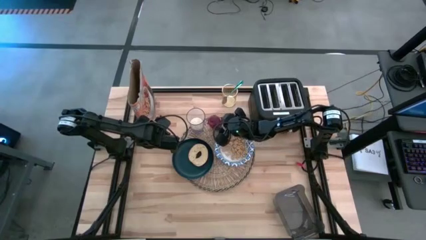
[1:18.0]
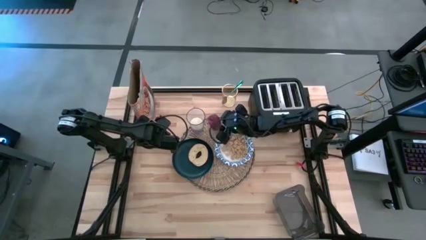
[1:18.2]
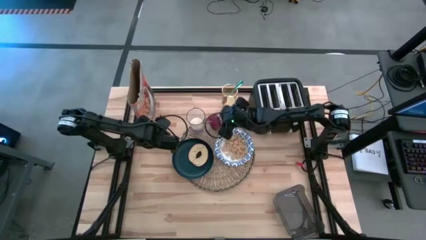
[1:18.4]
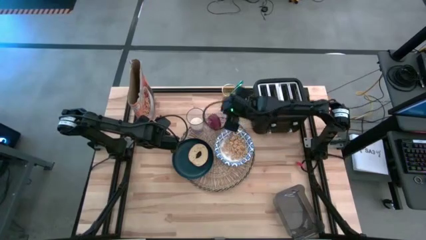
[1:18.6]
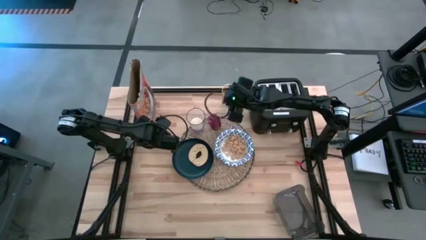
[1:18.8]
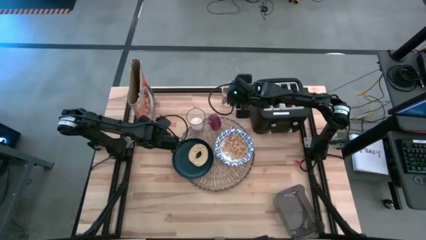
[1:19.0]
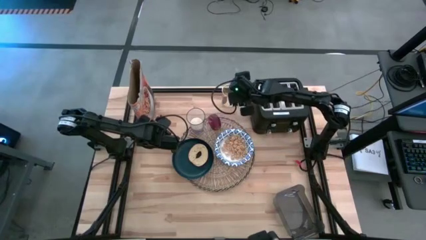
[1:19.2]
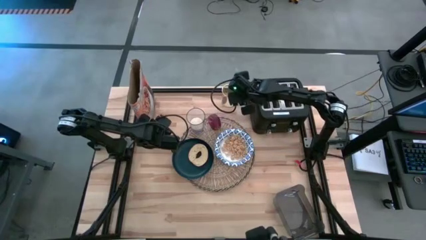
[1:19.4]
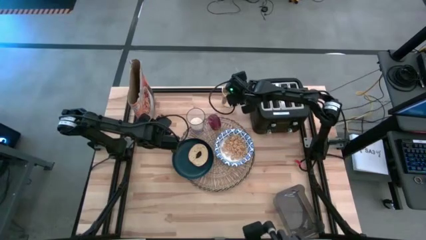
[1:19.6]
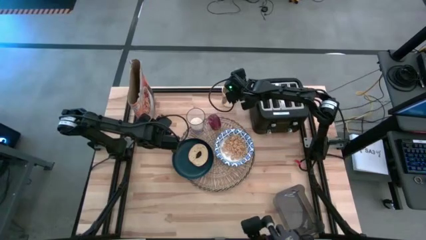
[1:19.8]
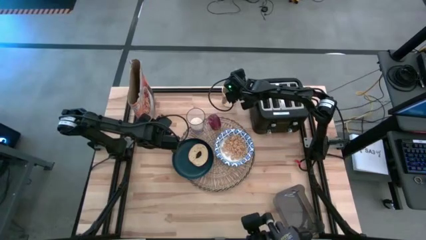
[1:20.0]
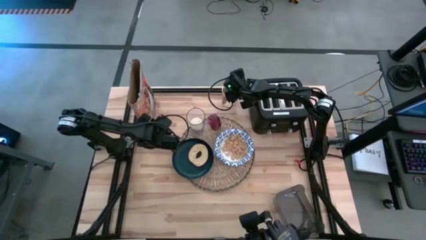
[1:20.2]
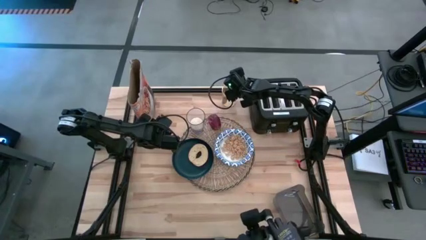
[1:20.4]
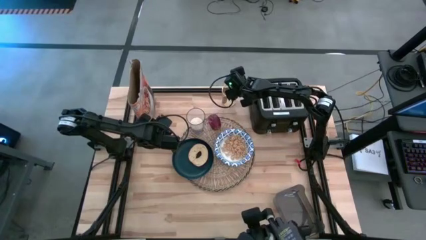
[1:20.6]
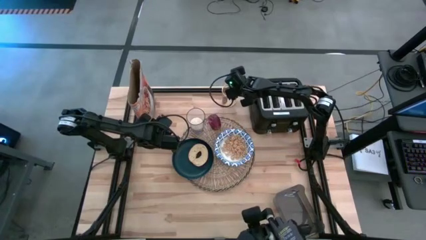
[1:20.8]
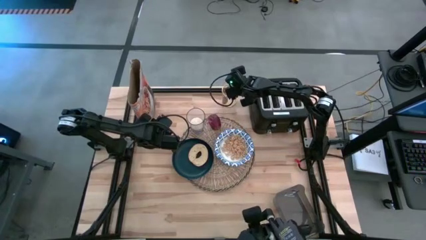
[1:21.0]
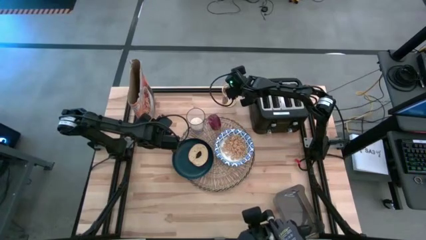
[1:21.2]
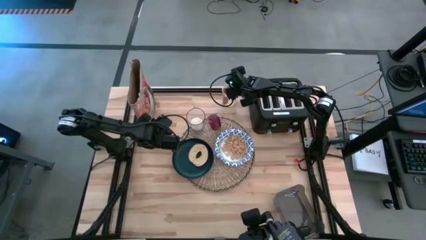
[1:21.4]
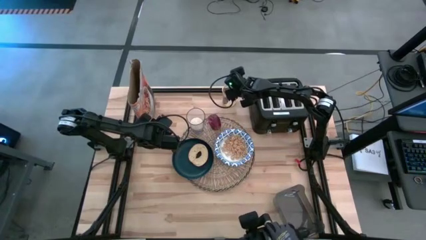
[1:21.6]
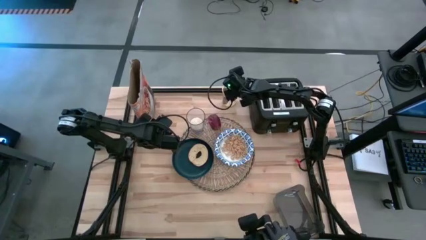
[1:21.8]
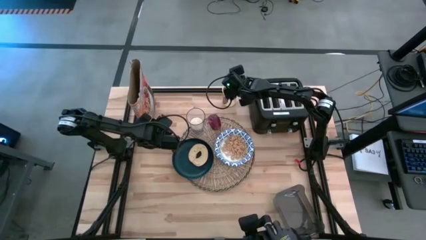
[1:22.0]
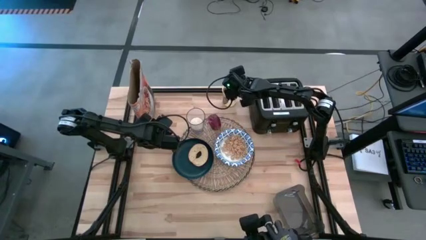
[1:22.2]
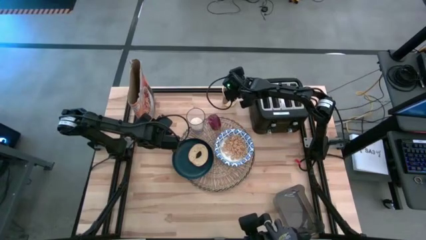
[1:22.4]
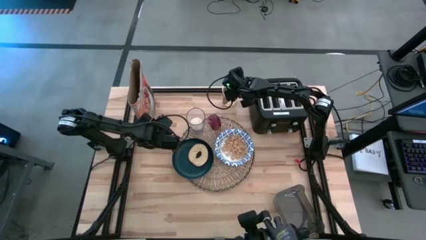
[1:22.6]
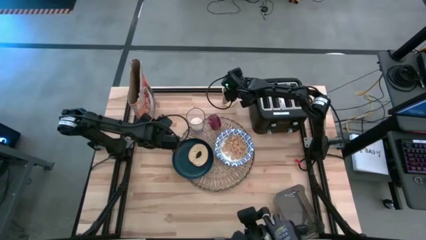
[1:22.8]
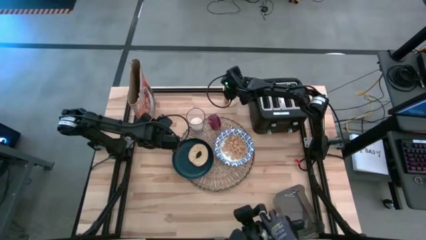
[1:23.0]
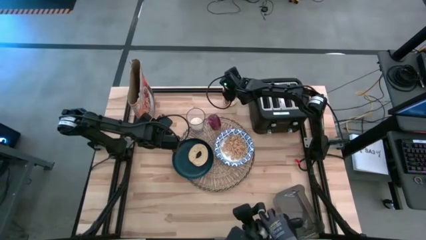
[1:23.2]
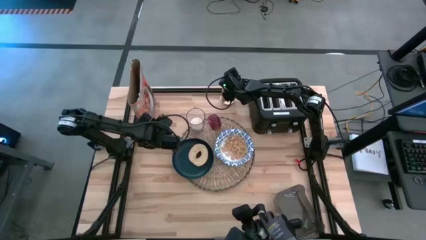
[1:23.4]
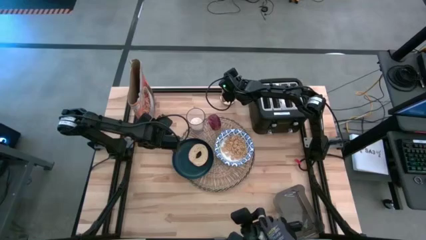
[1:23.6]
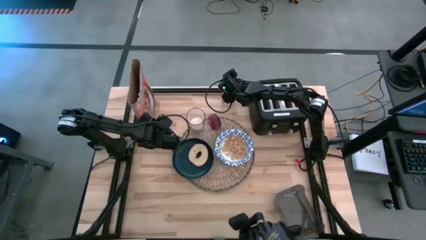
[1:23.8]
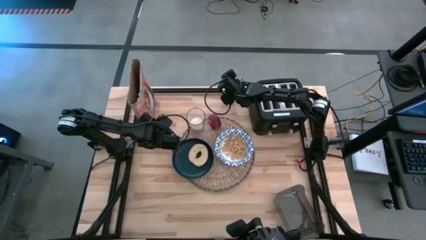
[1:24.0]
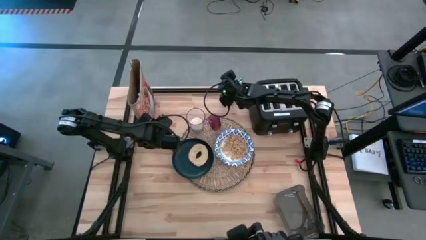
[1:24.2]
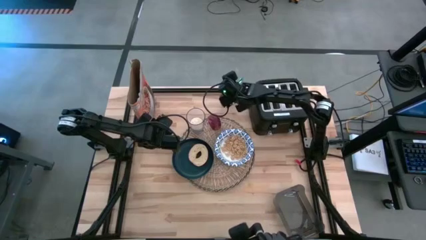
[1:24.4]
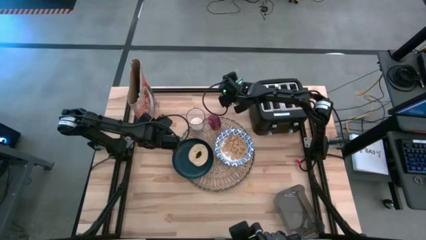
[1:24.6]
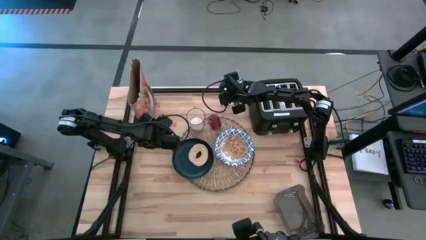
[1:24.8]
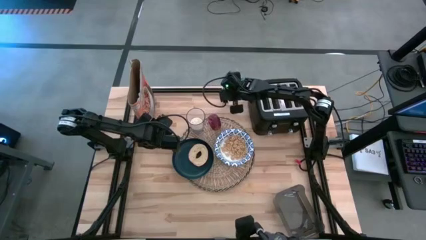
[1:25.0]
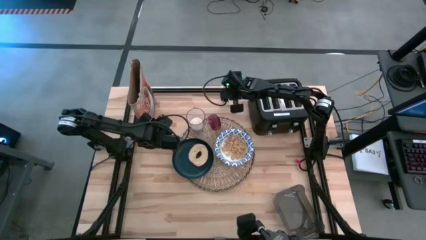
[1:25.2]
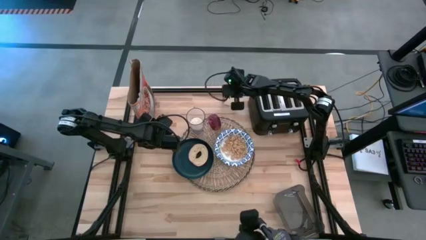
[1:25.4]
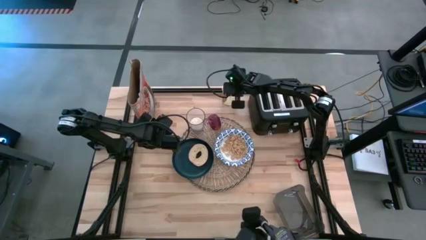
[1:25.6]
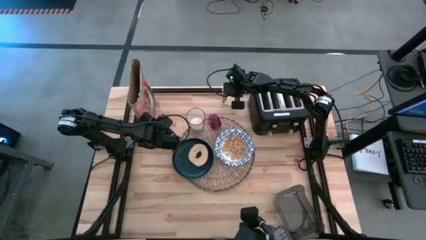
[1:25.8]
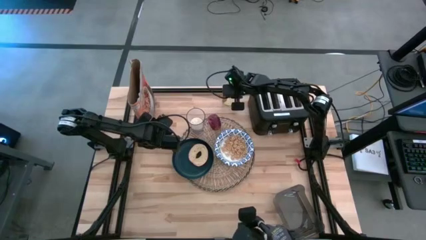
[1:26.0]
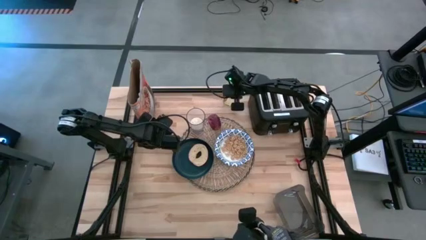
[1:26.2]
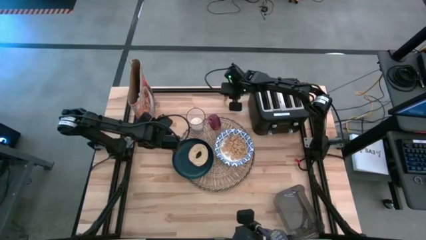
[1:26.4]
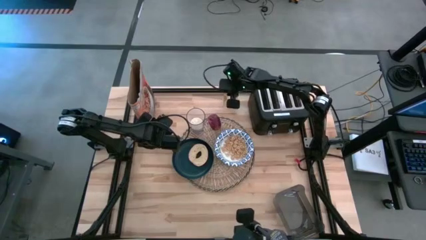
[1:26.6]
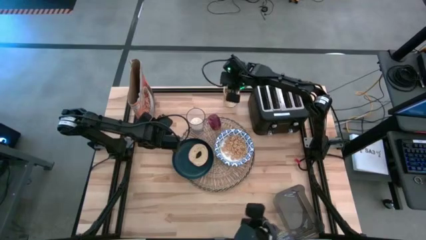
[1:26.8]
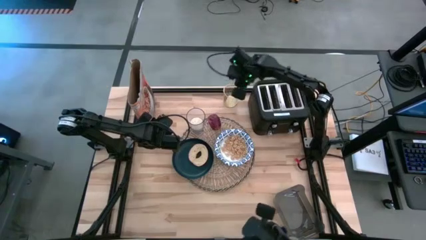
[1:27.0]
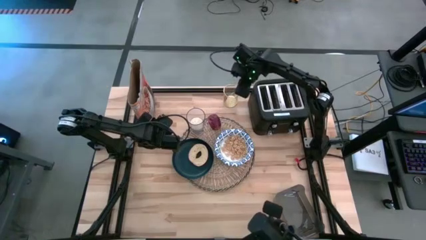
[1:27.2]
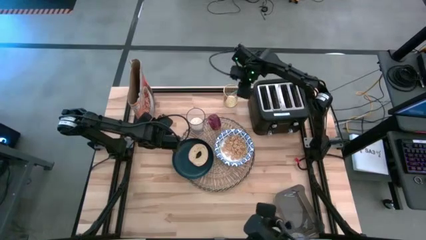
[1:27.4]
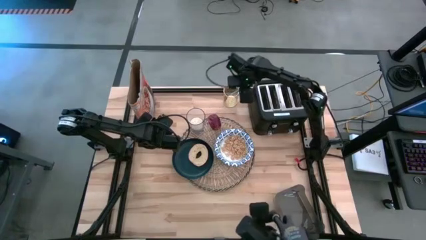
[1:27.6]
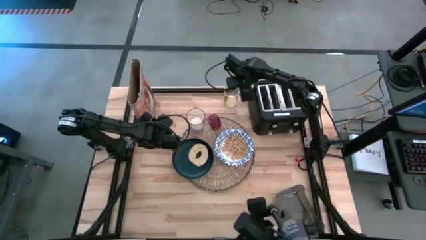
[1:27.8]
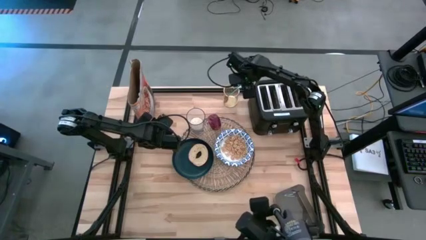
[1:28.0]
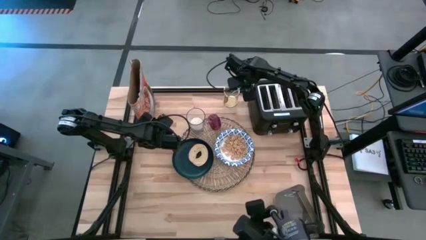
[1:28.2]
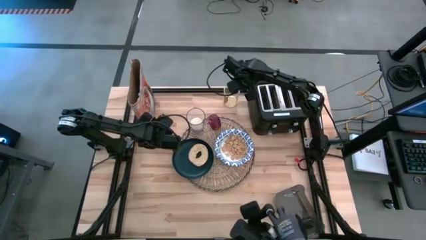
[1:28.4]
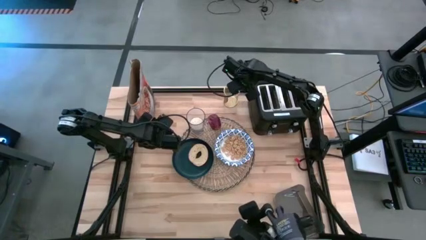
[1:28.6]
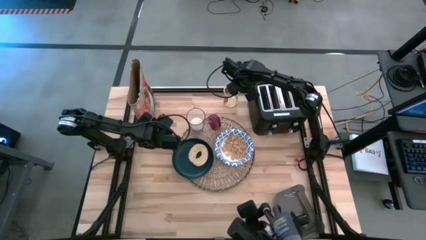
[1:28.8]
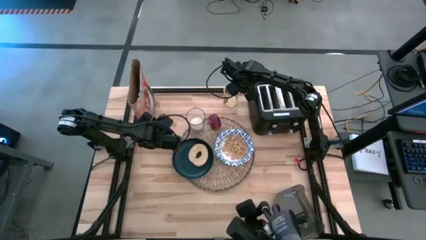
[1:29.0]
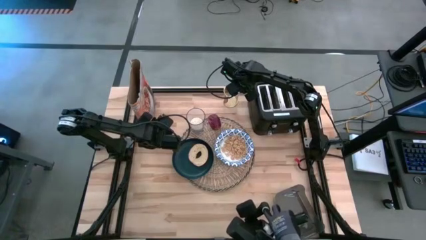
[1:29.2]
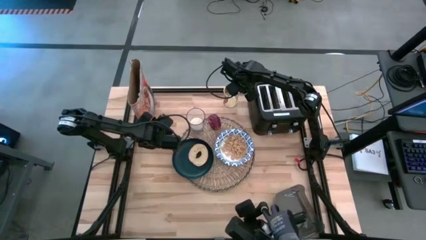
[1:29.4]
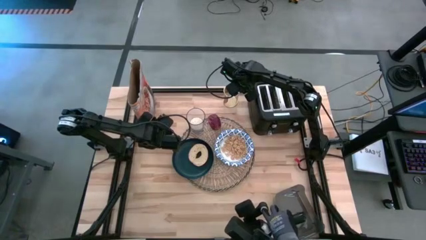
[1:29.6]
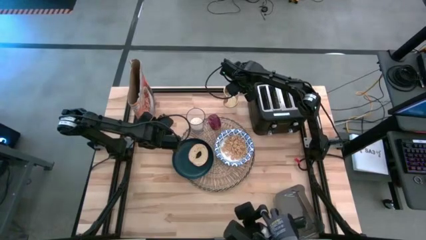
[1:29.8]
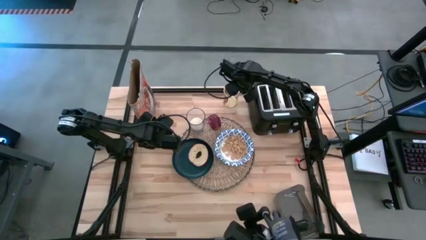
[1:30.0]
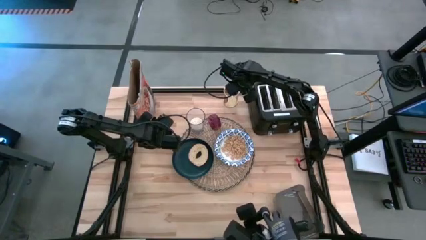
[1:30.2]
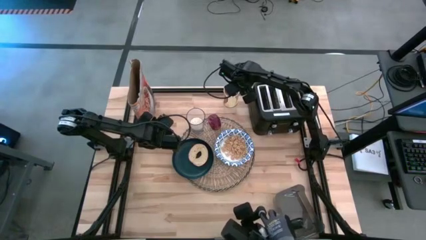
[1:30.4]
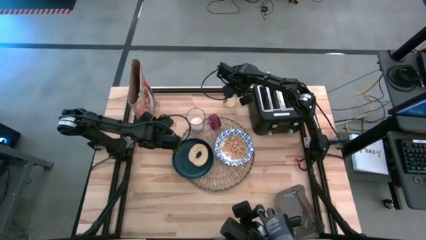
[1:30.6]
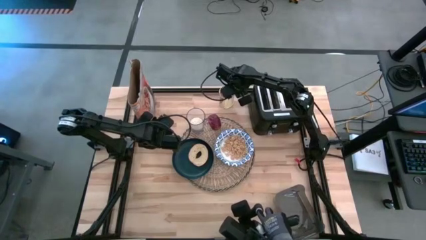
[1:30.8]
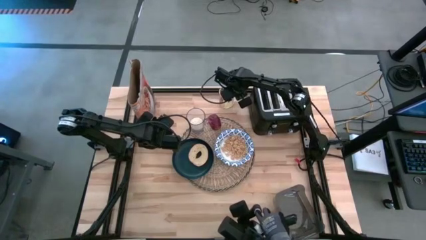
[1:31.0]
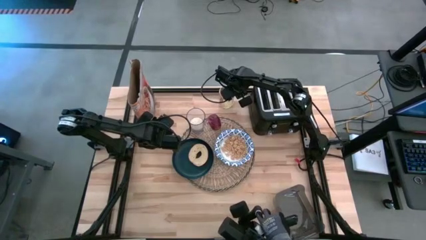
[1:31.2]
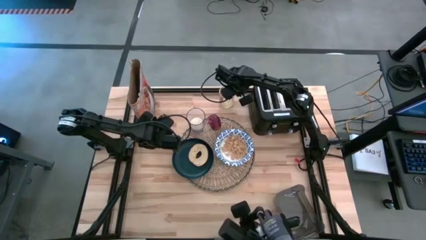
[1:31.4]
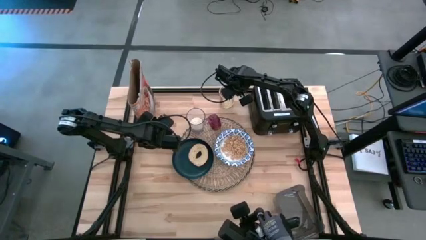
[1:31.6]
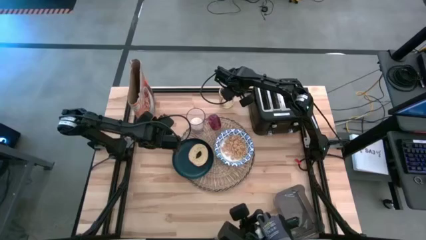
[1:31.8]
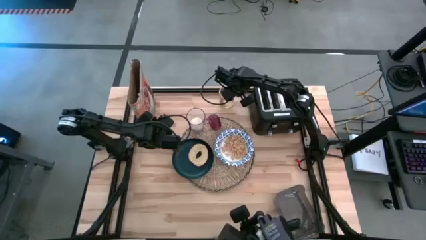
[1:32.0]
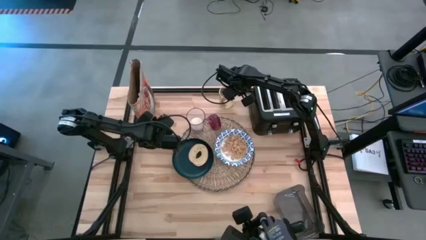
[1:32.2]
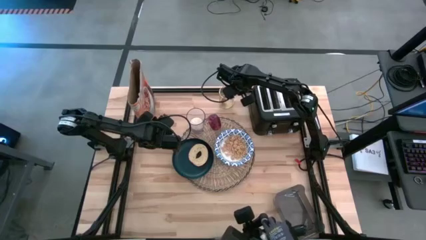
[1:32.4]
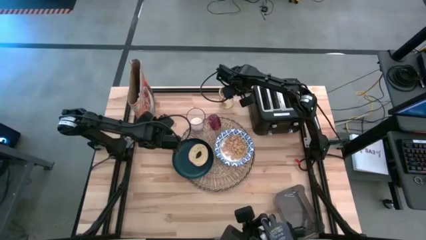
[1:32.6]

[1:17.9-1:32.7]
Task: Arrange a breakfast setting
Put the blue spoon from the yellow cup to the right of the brown placemat

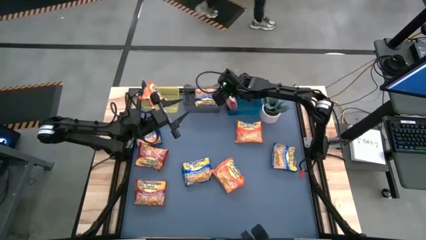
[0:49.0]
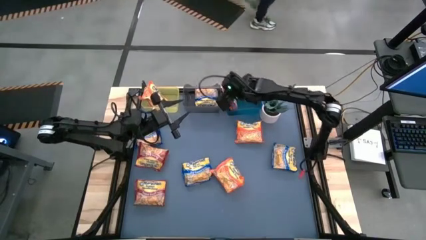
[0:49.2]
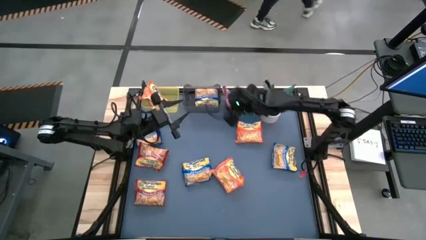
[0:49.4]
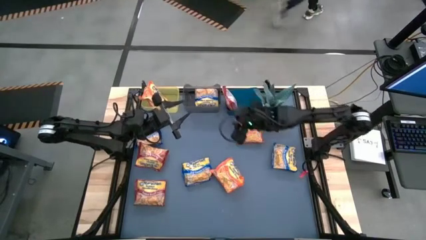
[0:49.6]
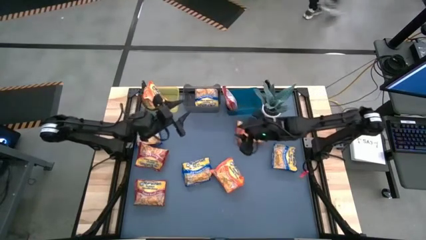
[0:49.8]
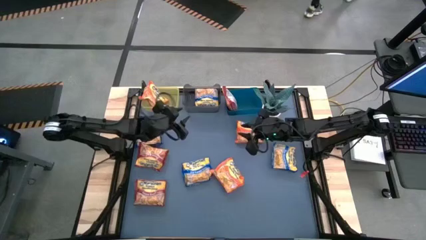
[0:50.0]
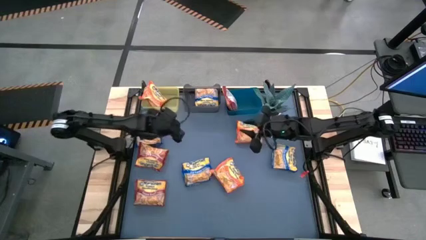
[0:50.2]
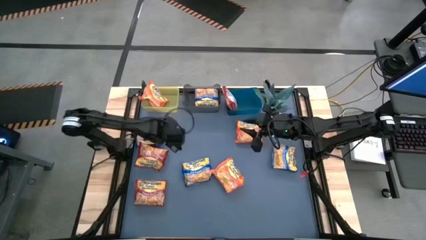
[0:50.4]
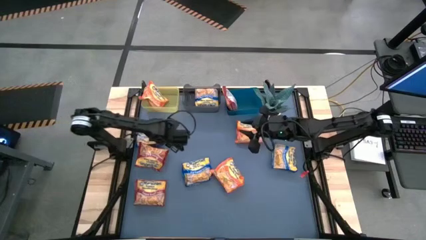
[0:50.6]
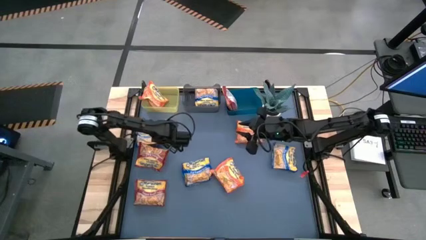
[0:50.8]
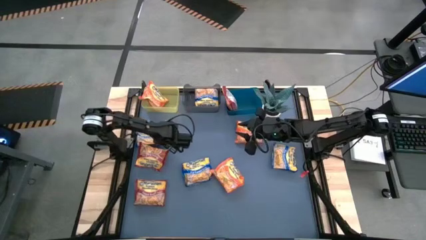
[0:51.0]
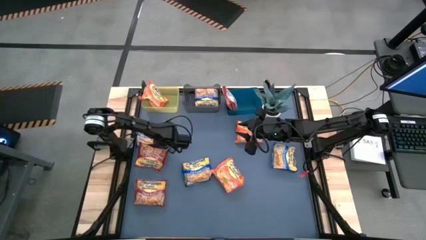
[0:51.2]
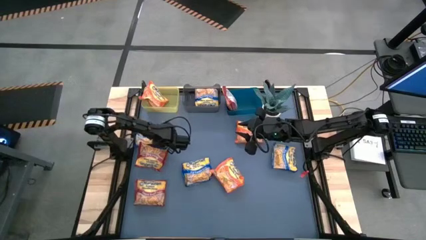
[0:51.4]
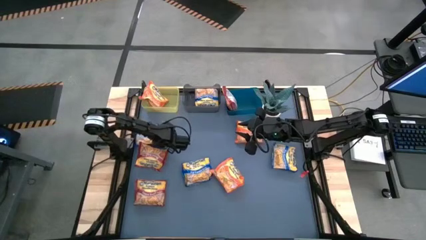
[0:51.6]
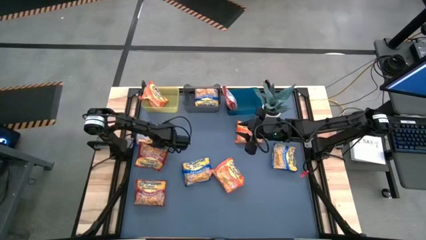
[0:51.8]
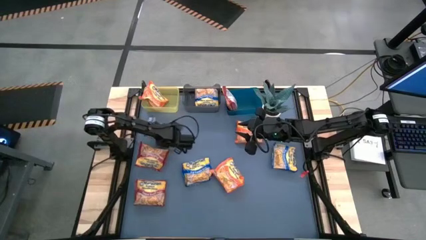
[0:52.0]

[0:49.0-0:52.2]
Task: Sort Maruchan noodles
Put the blue noodle pack into the black bin
